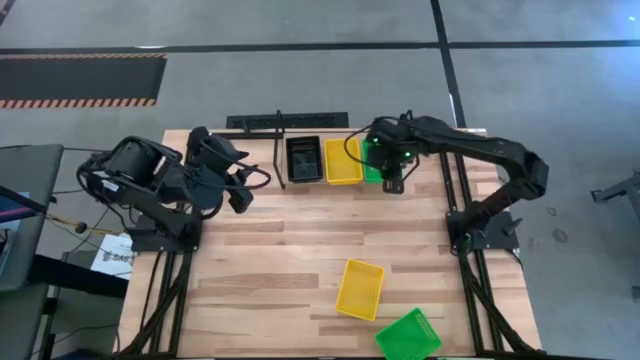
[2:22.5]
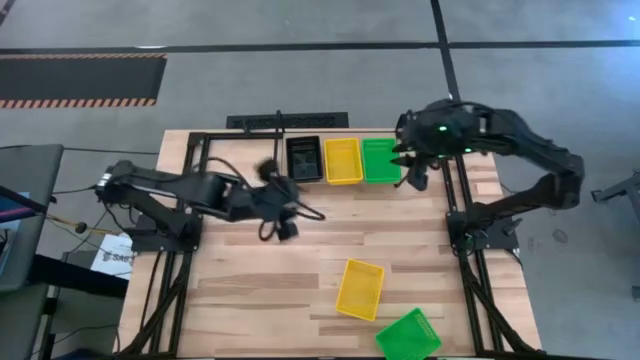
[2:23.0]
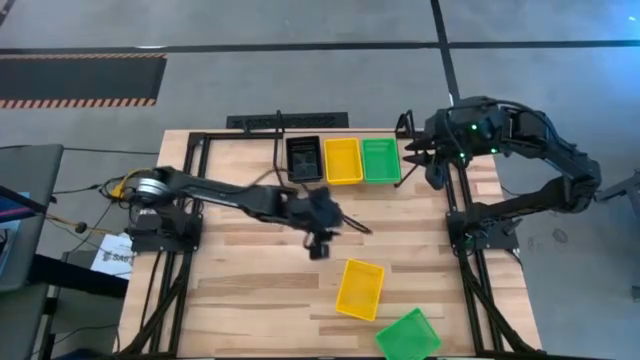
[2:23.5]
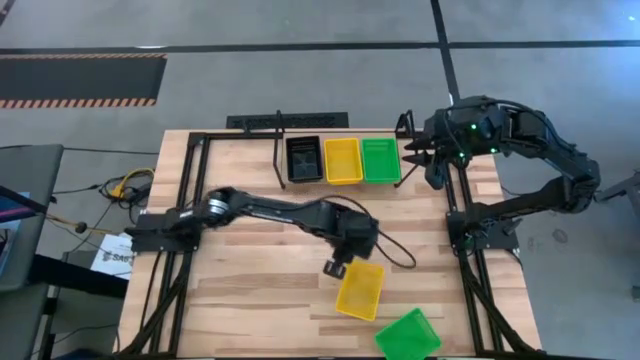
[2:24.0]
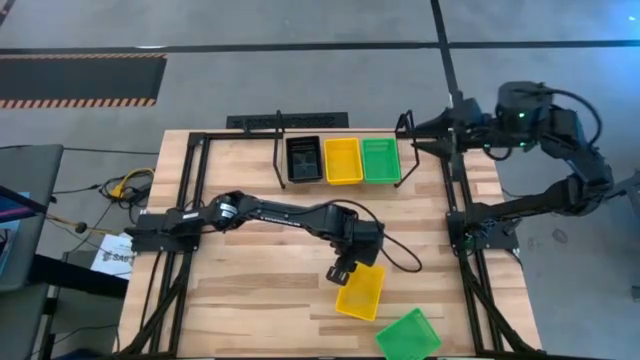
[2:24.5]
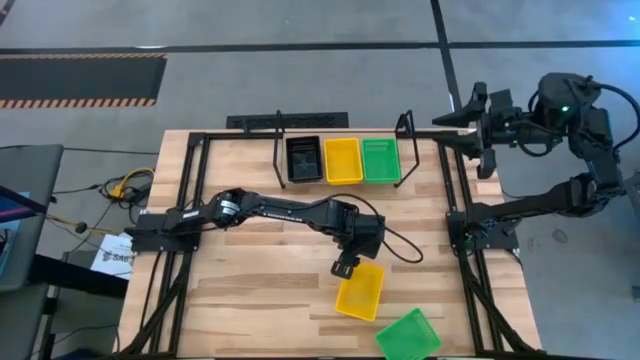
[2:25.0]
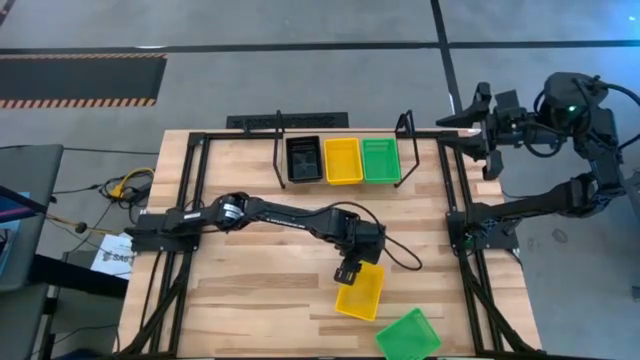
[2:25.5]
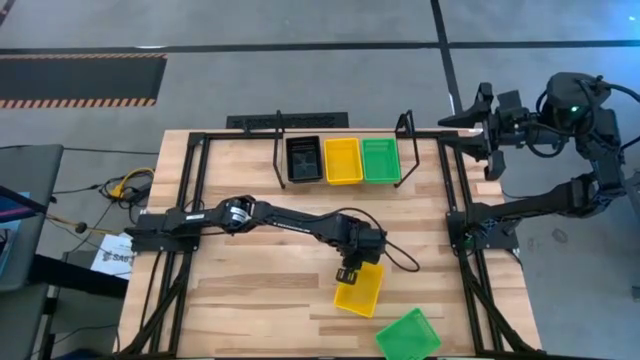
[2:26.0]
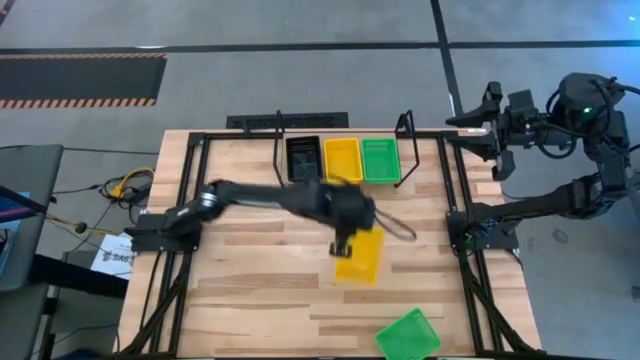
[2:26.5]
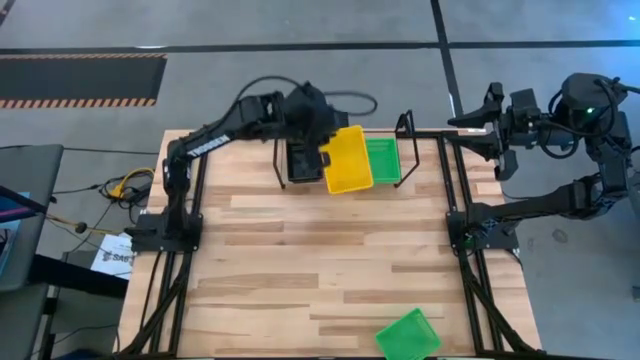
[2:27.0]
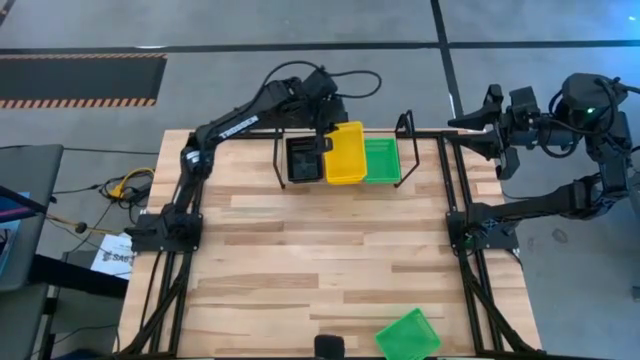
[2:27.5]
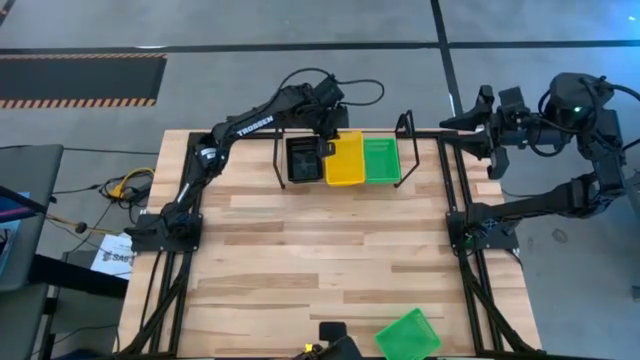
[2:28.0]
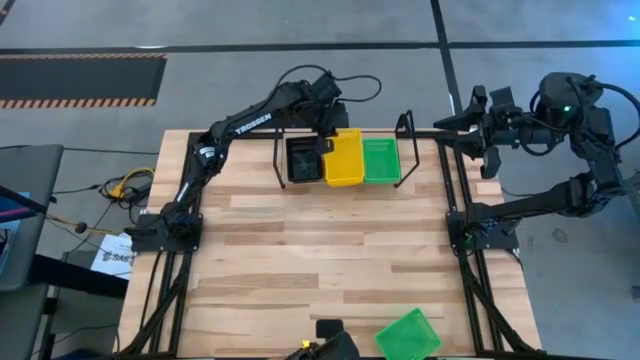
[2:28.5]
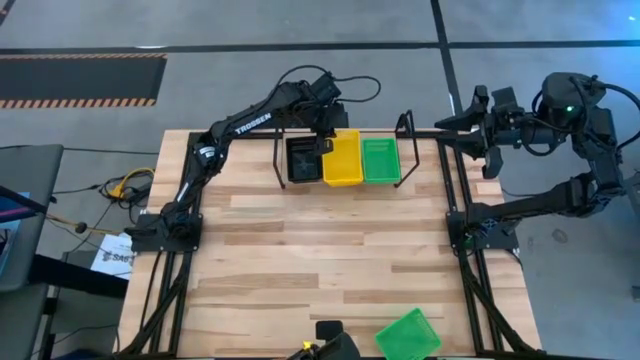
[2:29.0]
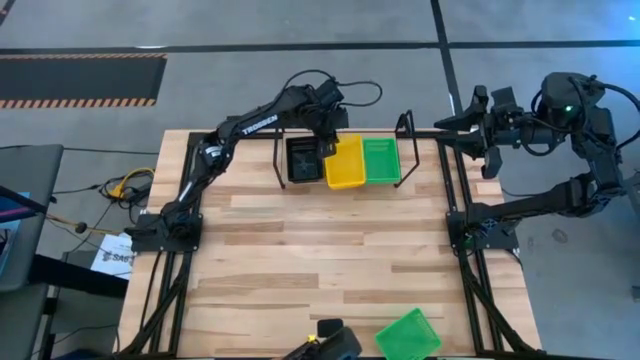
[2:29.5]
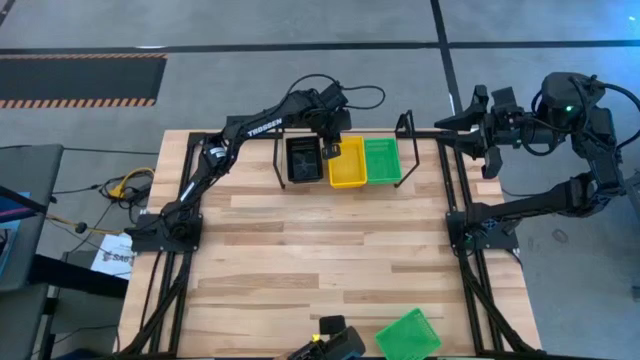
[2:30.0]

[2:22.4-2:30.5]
Task: Stack baskets on shelf by color
Stack the yellow bin on top of the yellow bin on the shelf

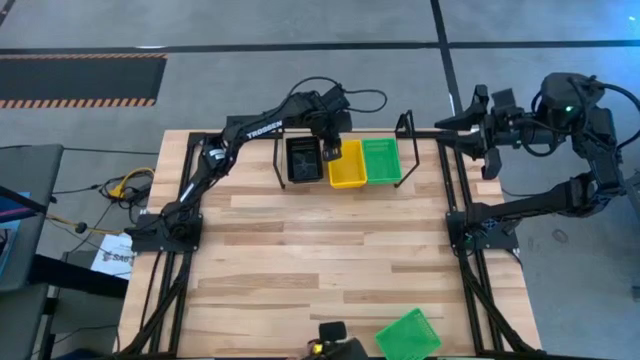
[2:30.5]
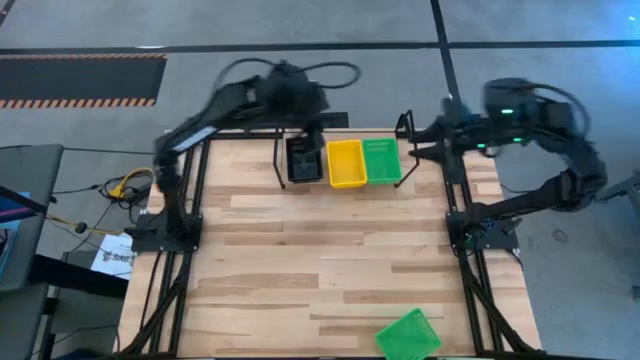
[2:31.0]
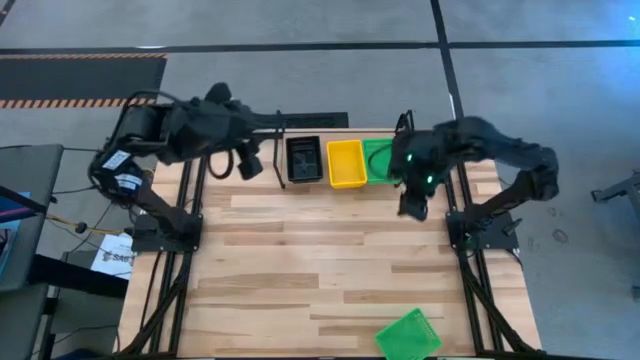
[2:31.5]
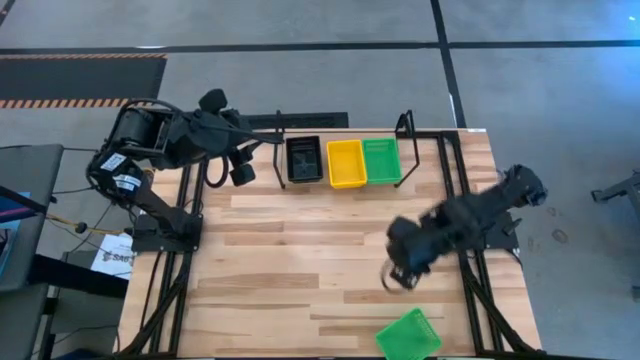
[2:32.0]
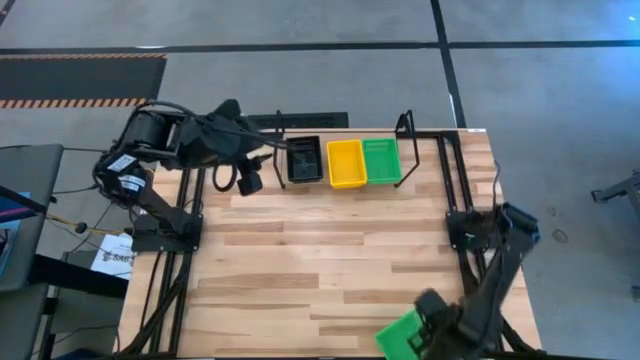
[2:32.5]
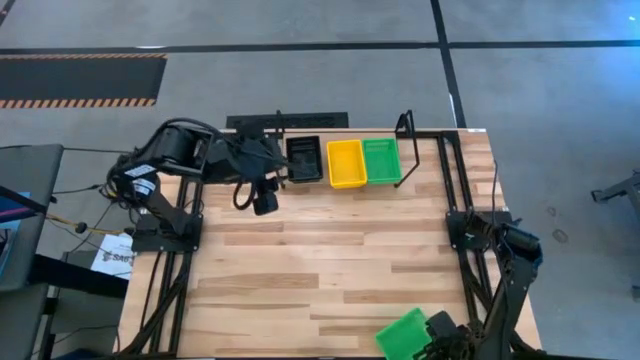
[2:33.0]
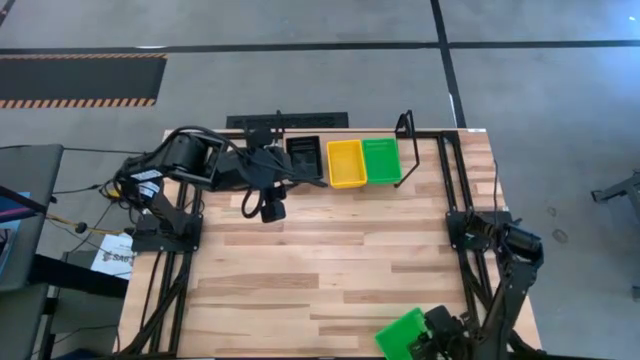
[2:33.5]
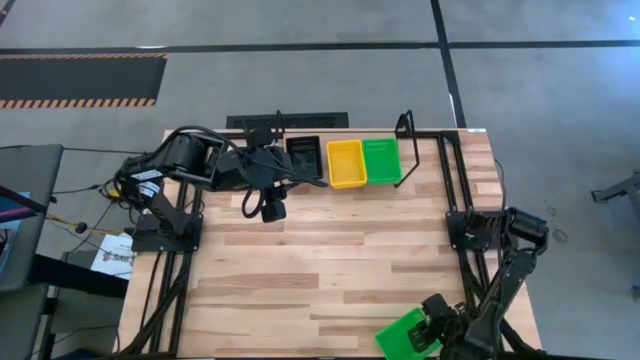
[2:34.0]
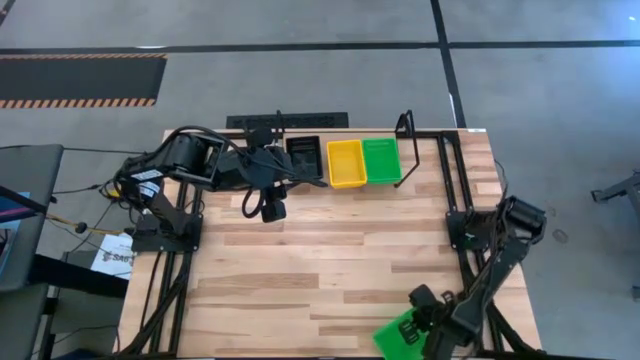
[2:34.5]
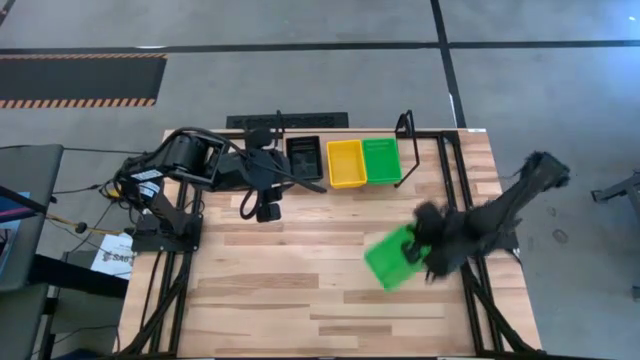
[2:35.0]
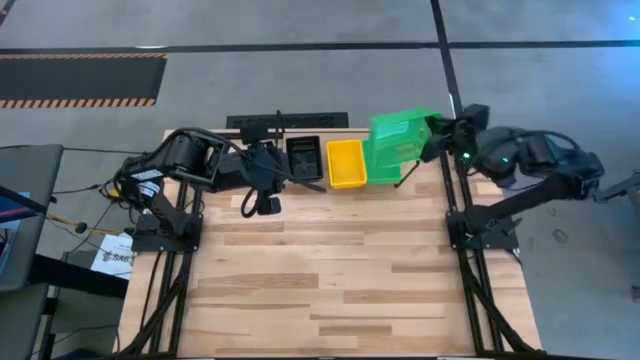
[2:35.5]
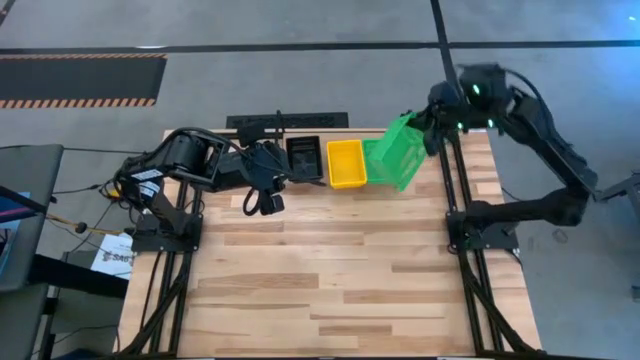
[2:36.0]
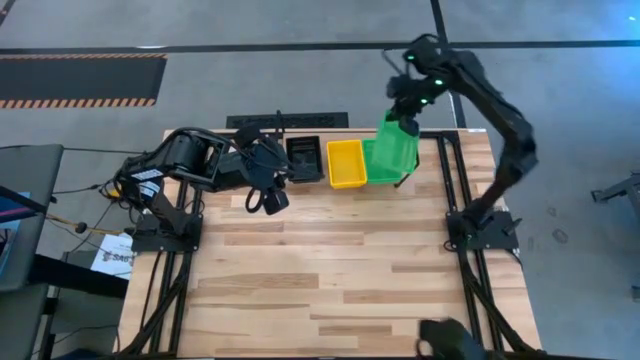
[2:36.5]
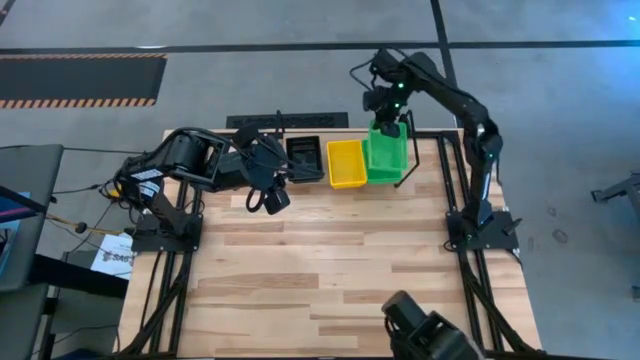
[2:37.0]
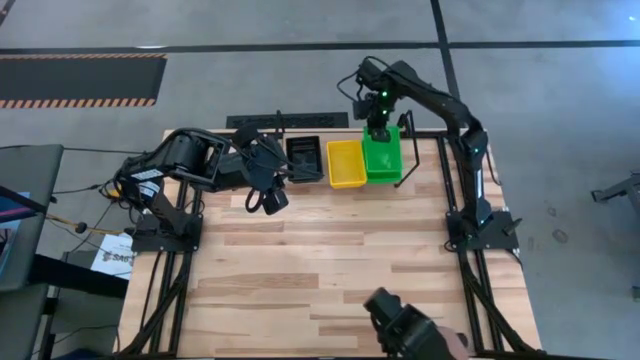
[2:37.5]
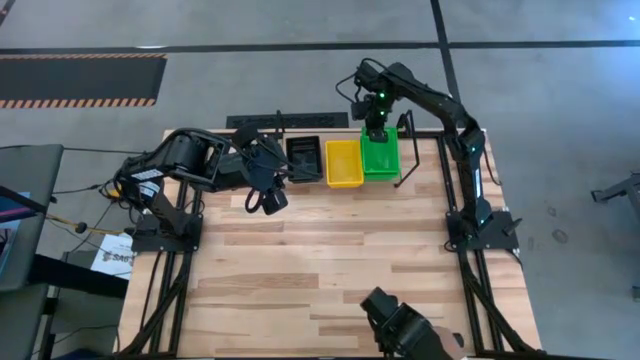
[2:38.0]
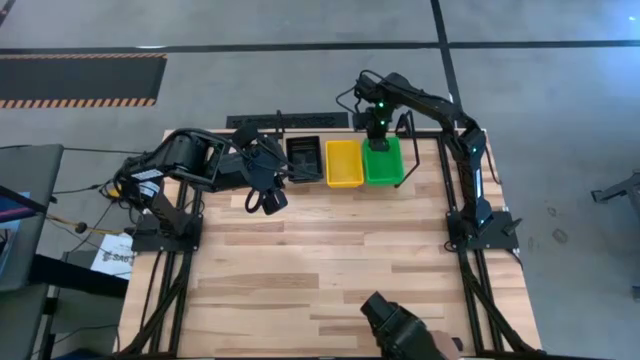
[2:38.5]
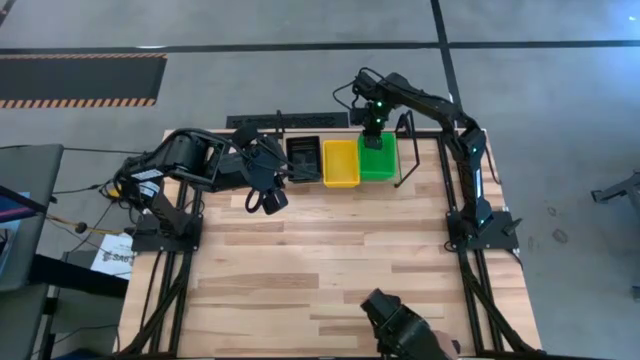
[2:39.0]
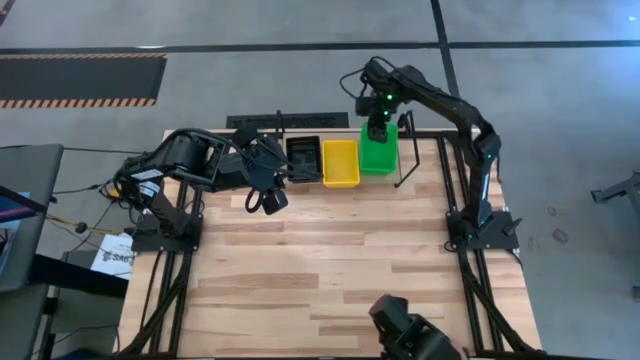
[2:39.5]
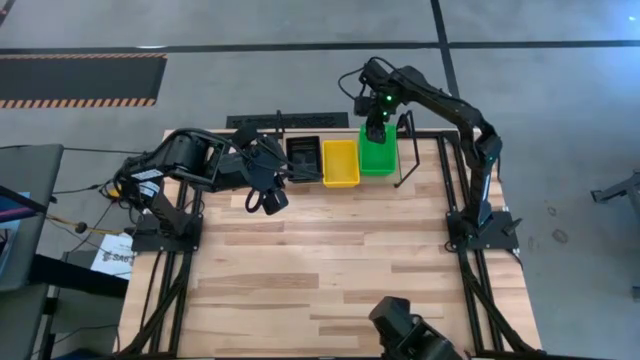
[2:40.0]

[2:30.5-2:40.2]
Stack the green bin on top of the green bin on the shelf

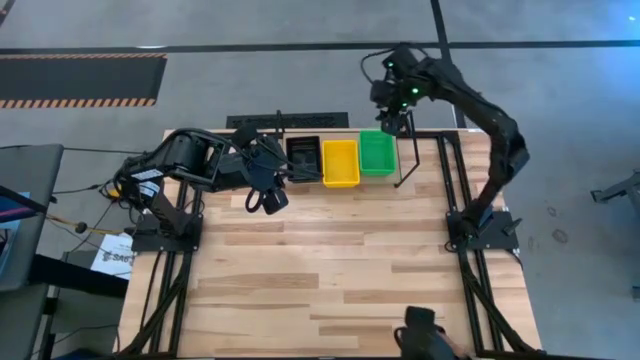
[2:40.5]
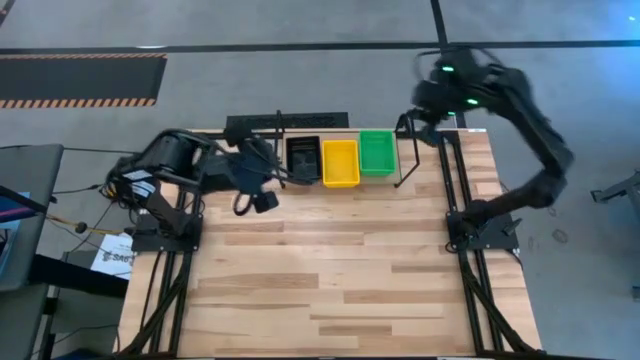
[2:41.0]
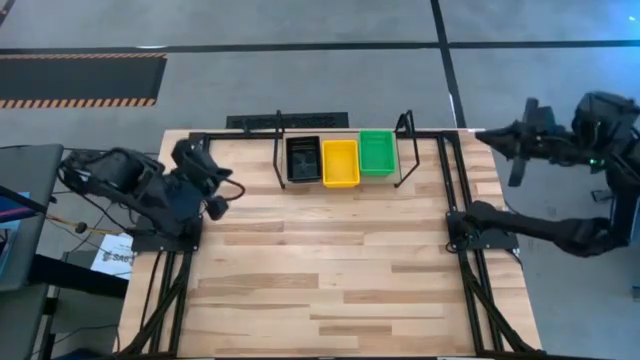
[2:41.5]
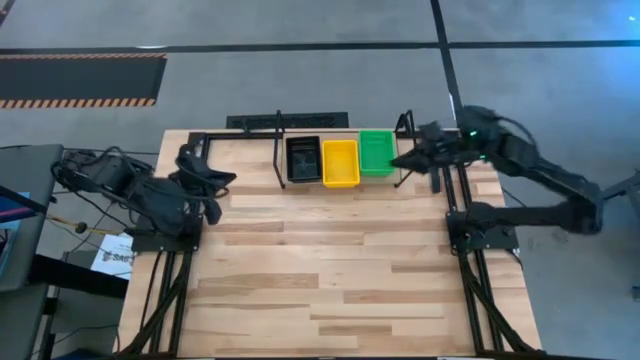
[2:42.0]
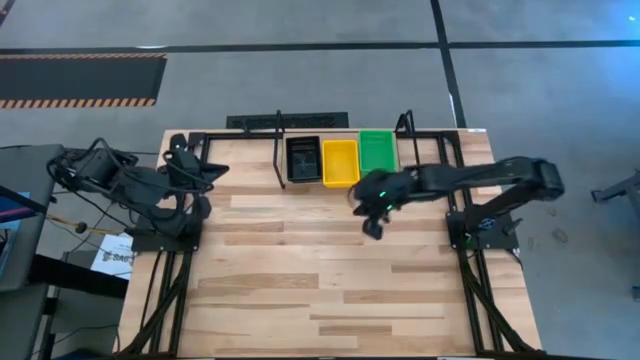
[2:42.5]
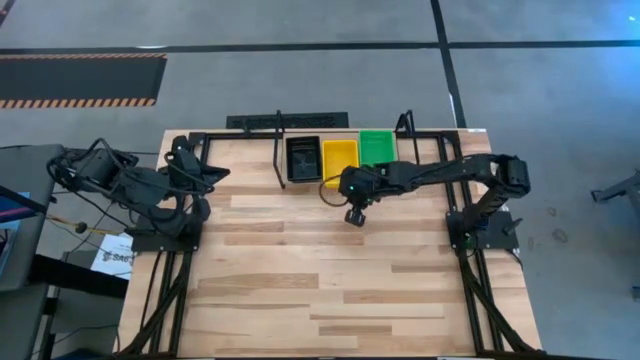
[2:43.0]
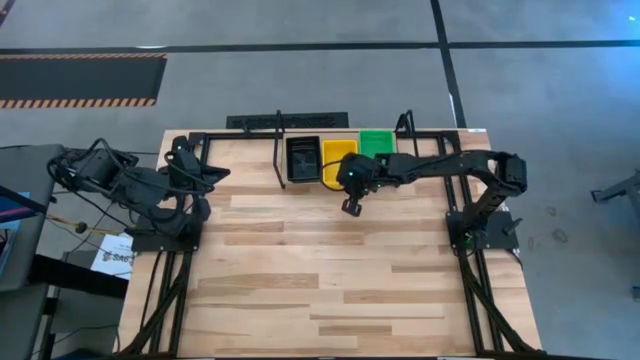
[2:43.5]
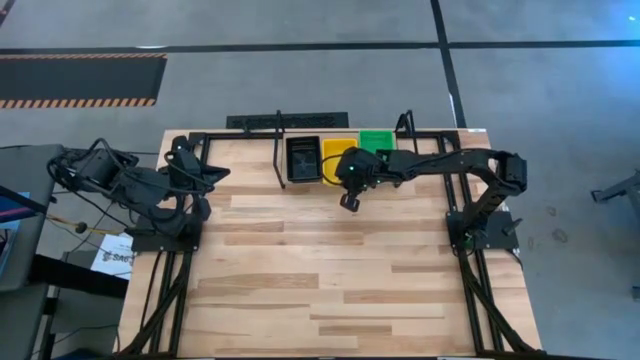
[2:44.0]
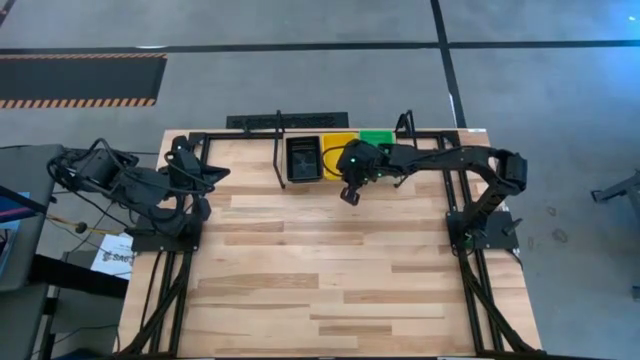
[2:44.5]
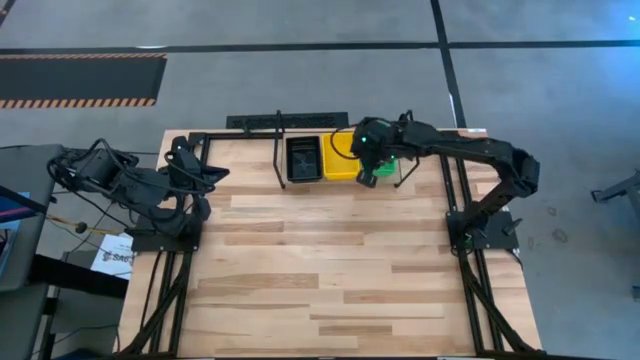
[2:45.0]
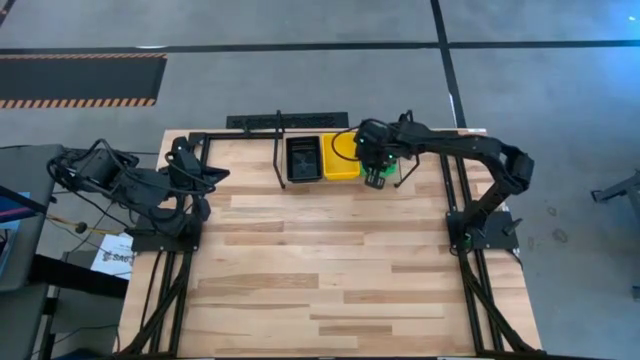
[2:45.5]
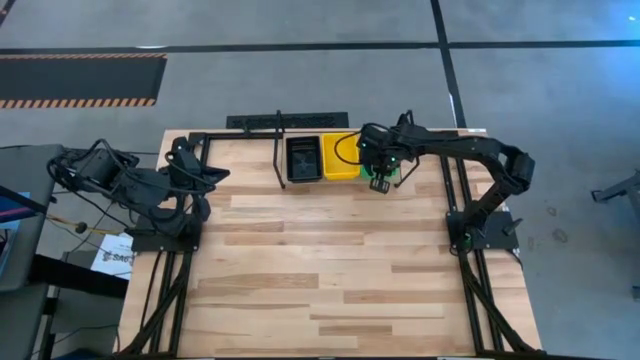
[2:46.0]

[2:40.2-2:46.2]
Adjust the stacked bins on the shelf
